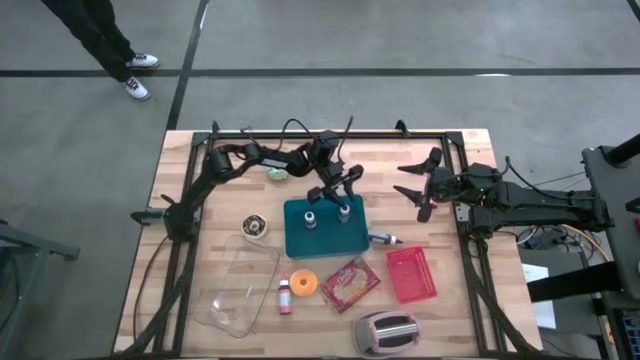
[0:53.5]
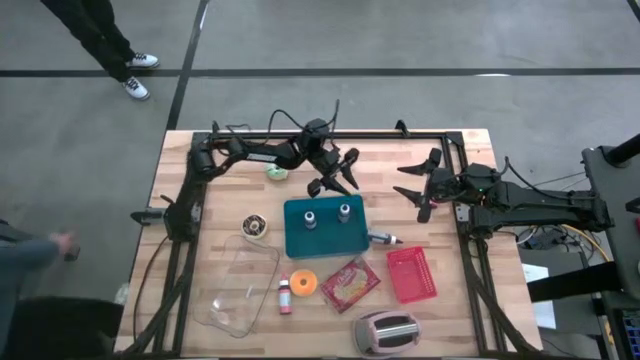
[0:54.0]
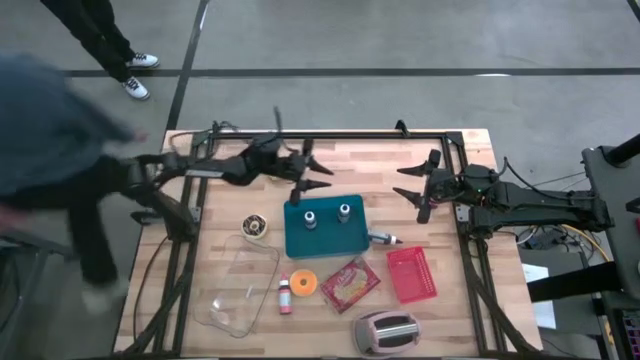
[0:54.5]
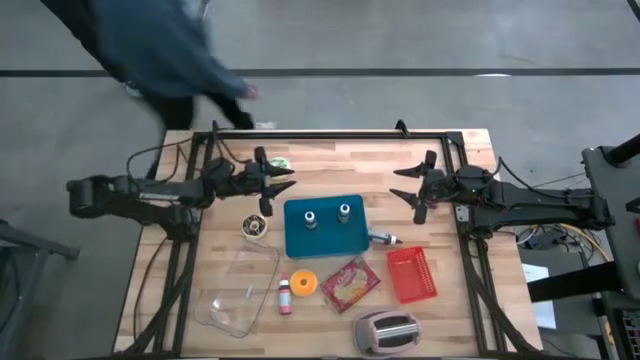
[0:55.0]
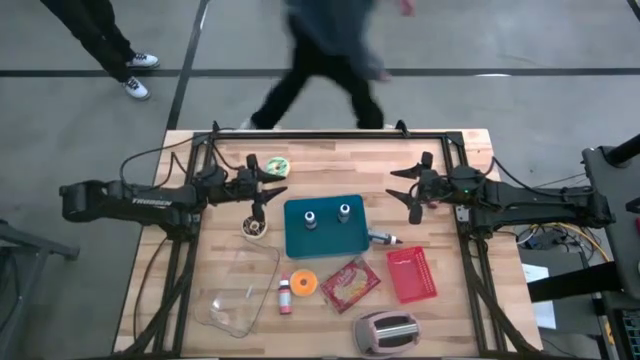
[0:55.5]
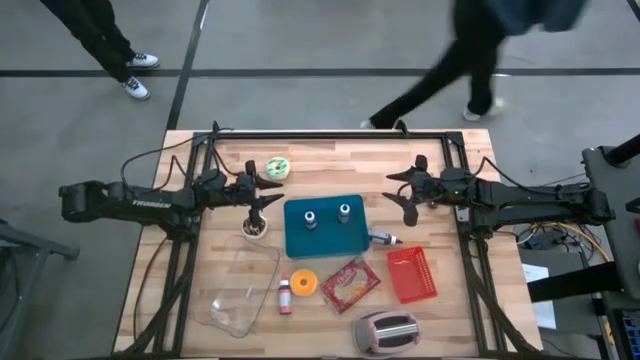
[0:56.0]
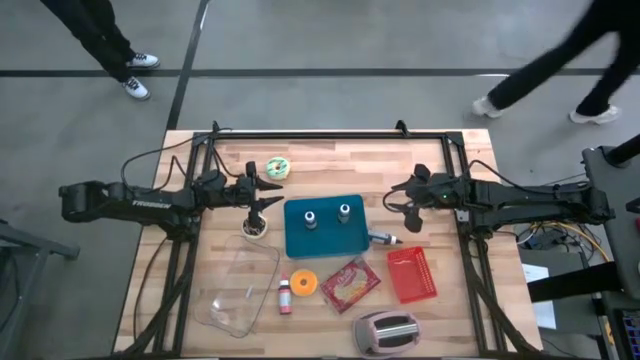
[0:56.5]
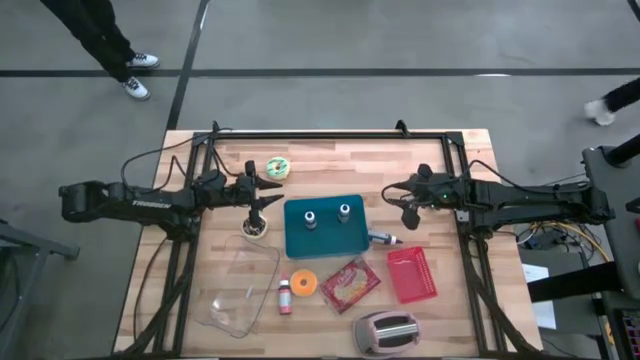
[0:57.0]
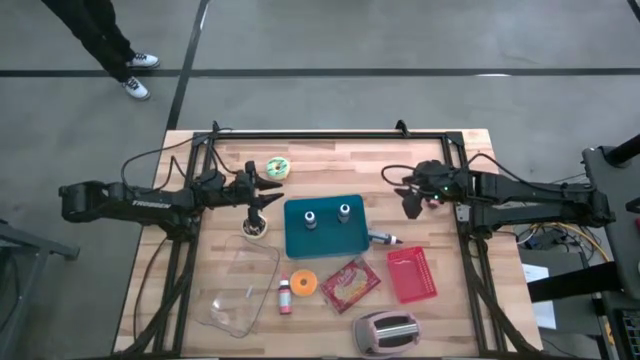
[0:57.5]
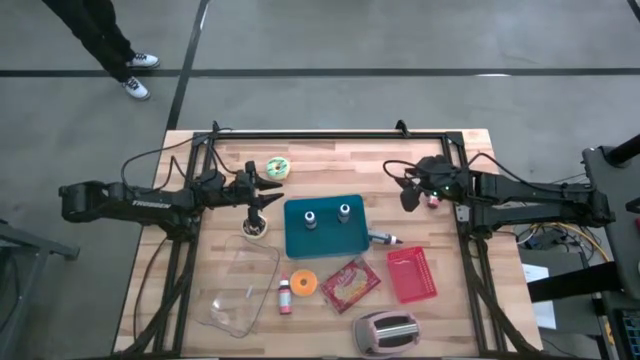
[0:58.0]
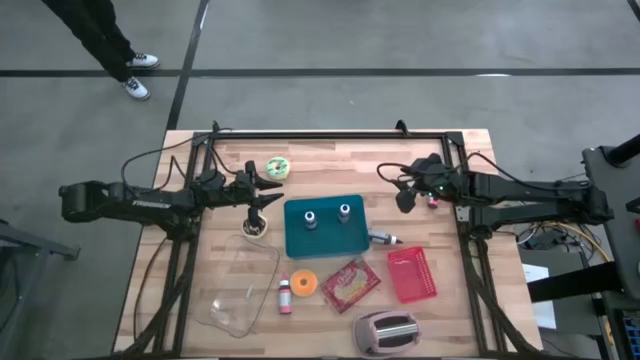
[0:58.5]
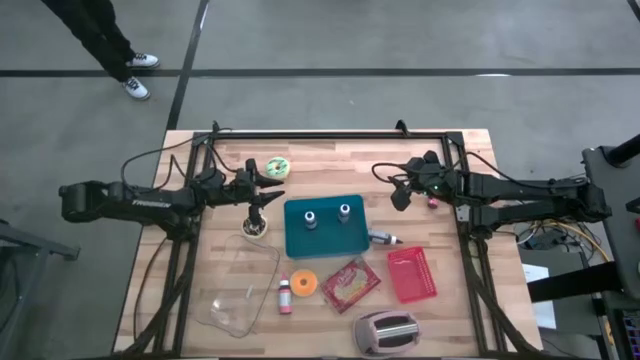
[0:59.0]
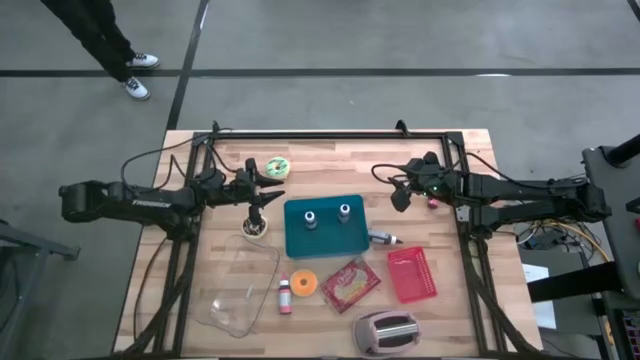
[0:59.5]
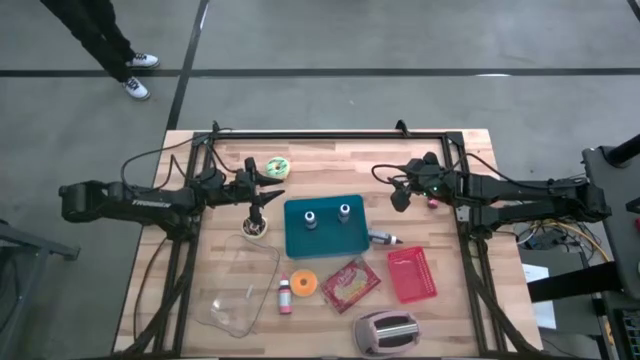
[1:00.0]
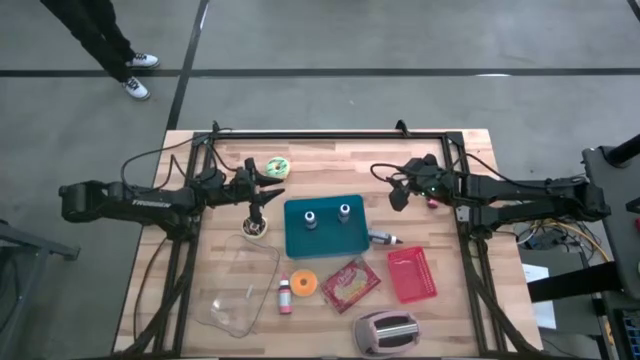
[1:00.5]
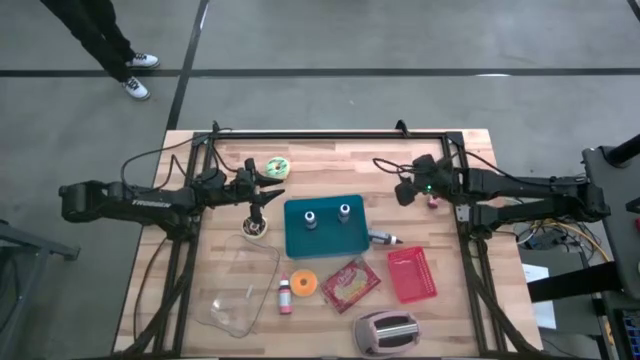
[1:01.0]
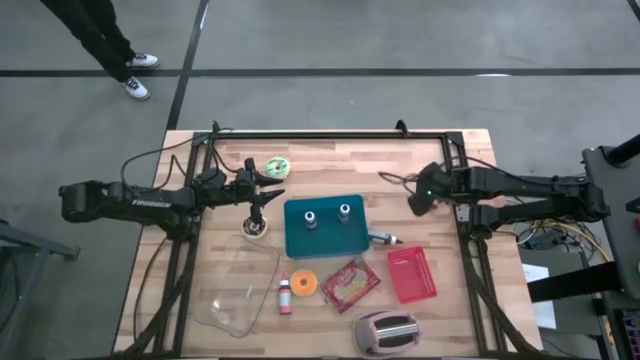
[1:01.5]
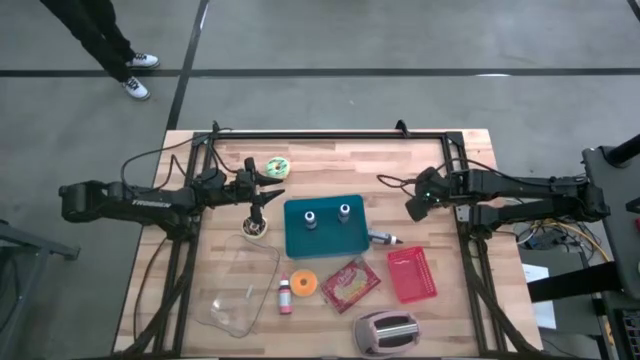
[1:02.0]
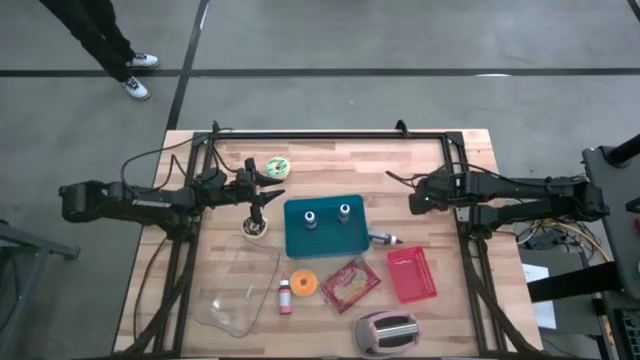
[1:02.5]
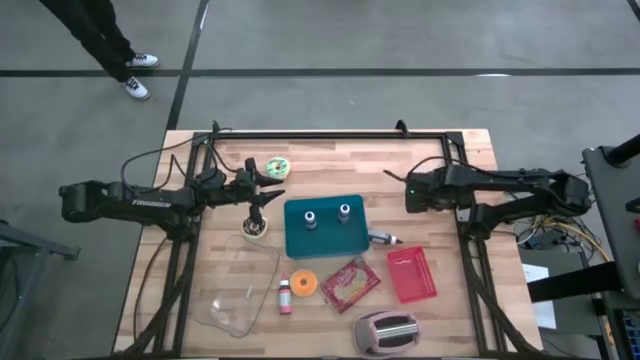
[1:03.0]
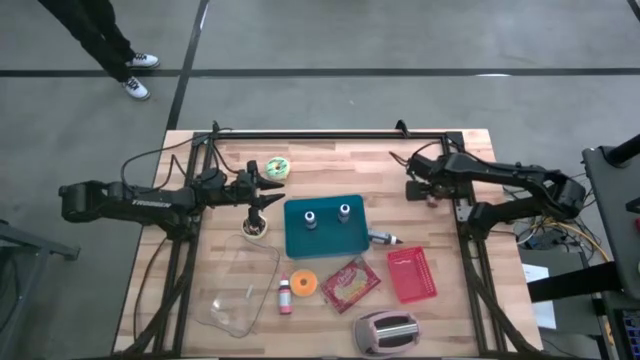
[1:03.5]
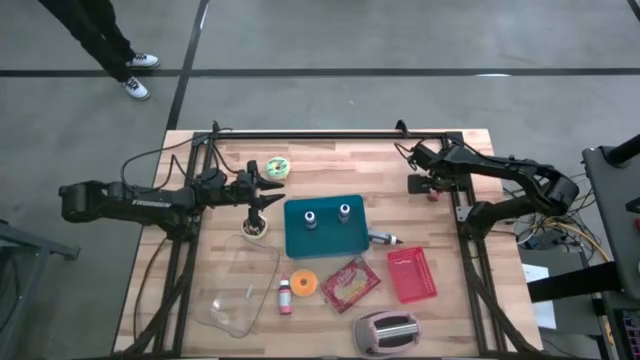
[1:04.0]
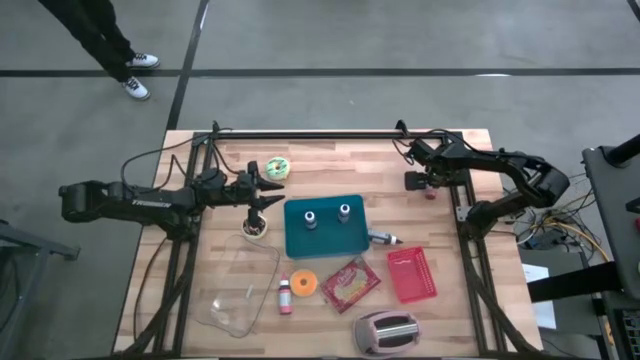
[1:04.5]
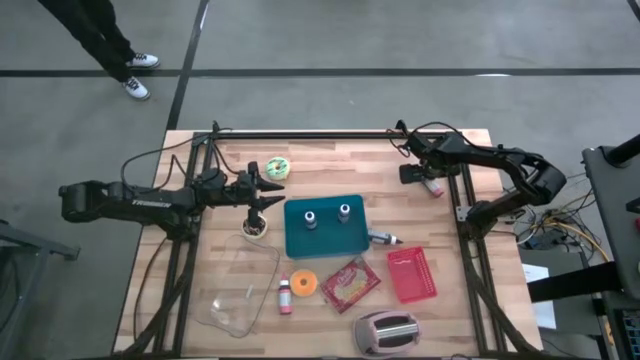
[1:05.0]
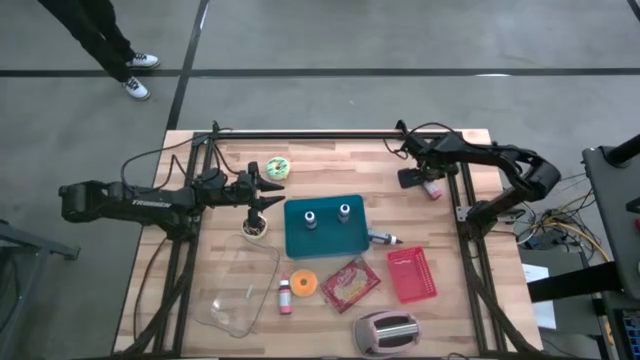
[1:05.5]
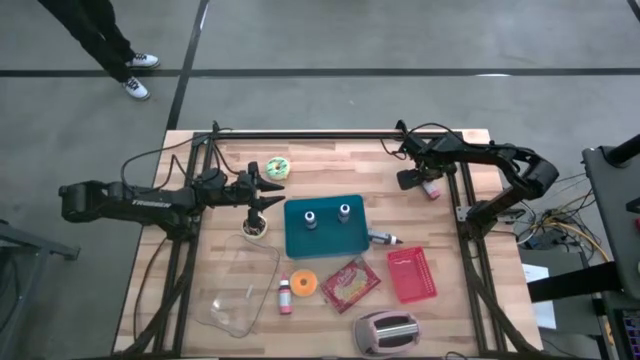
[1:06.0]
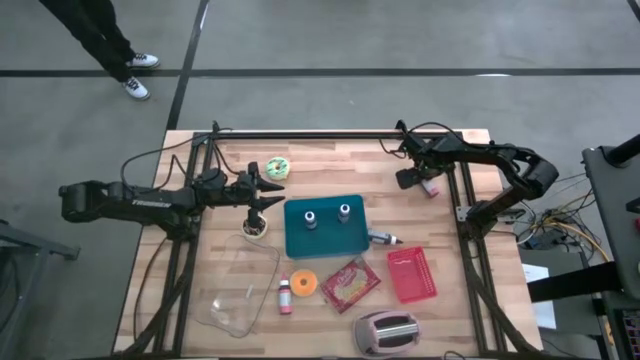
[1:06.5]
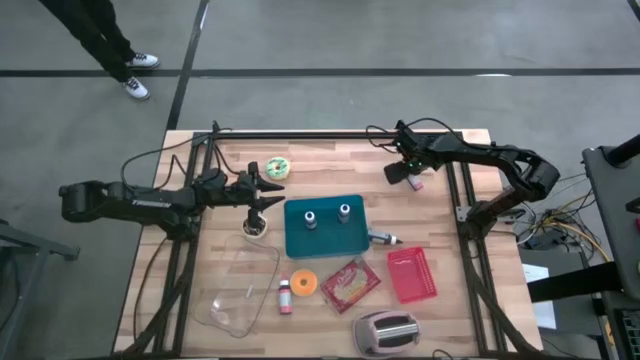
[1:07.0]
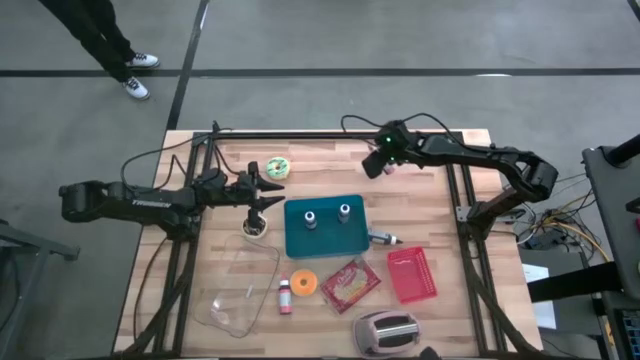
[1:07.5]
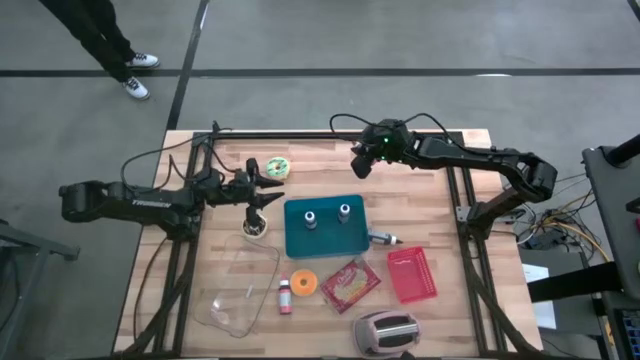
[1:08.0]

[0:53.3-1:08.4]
Task: Pick & Place Food Item
Put the top pink food coloring bottle into the blue bin

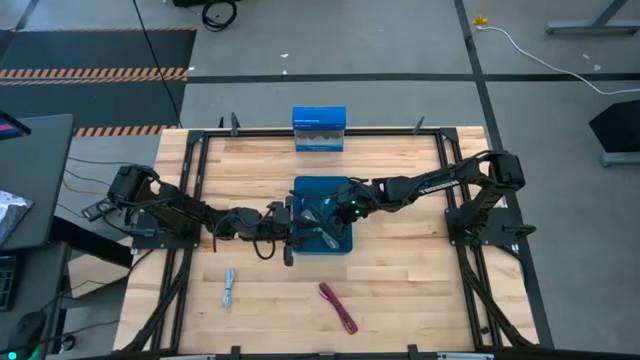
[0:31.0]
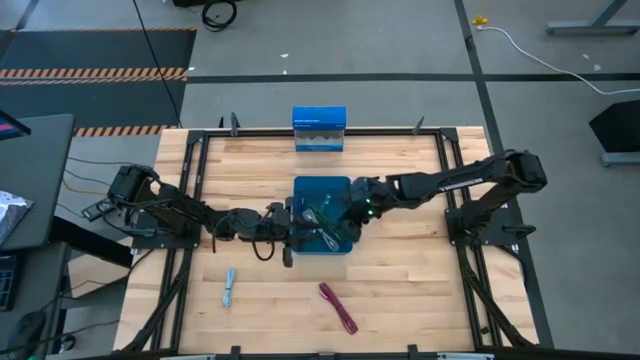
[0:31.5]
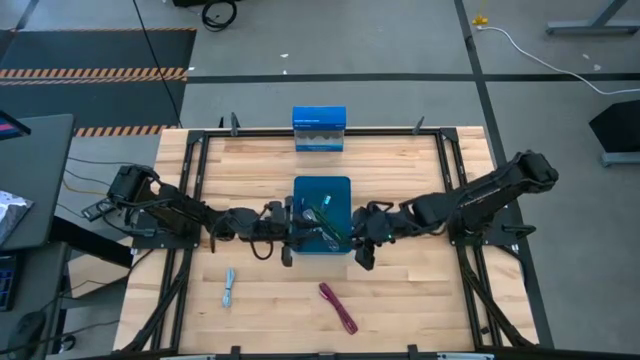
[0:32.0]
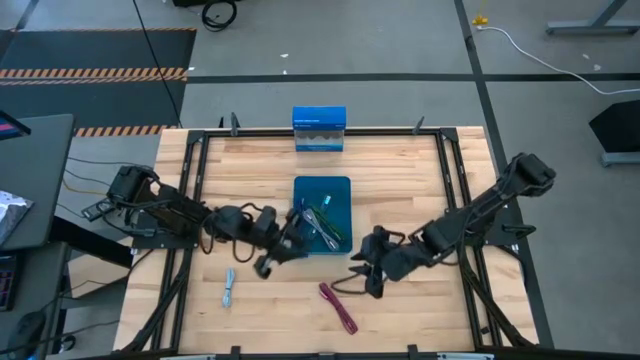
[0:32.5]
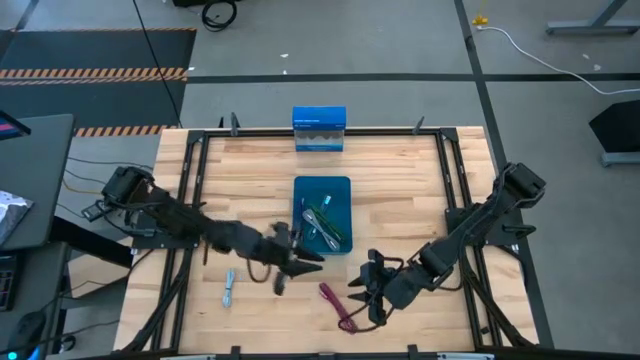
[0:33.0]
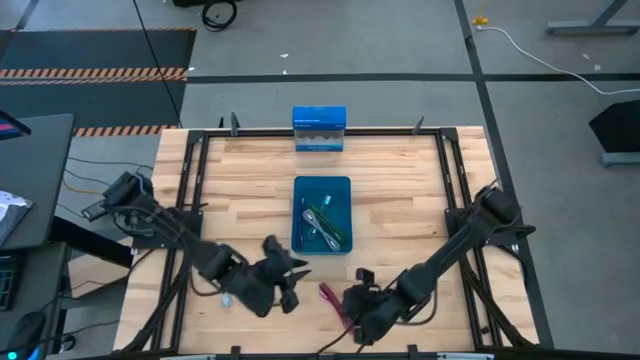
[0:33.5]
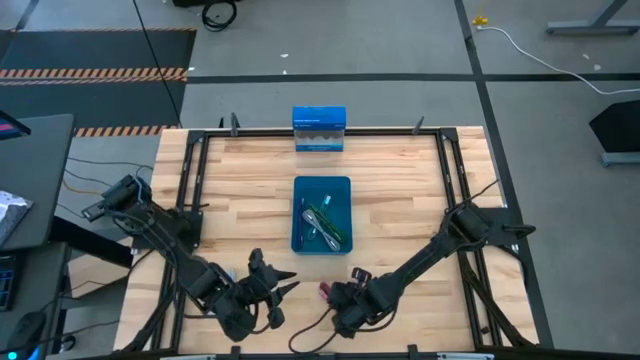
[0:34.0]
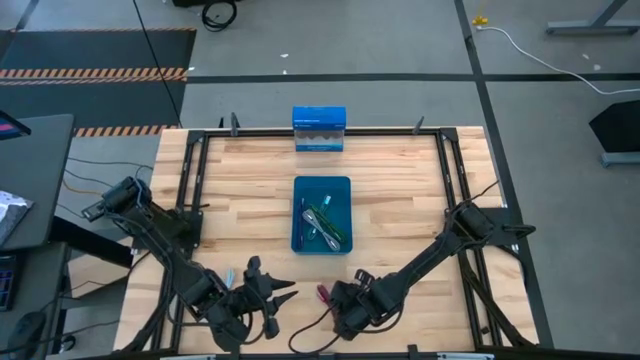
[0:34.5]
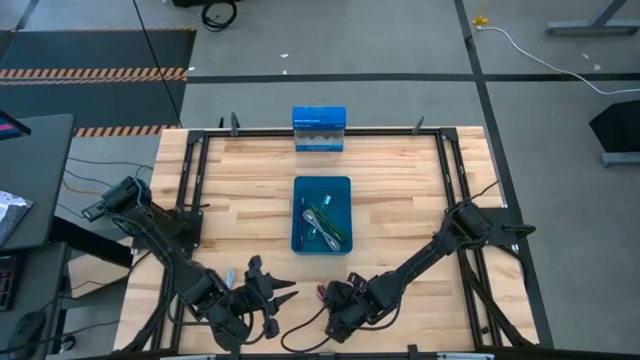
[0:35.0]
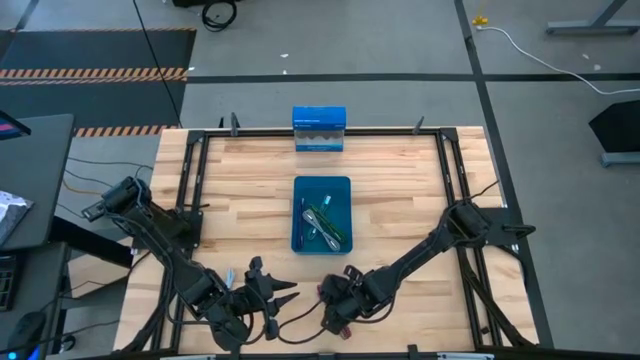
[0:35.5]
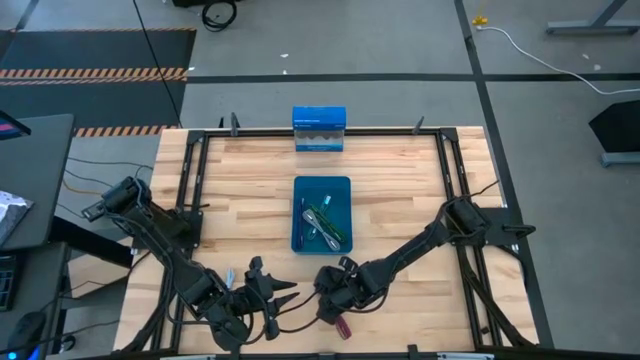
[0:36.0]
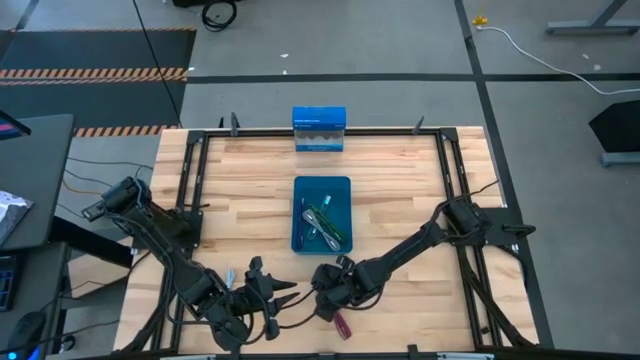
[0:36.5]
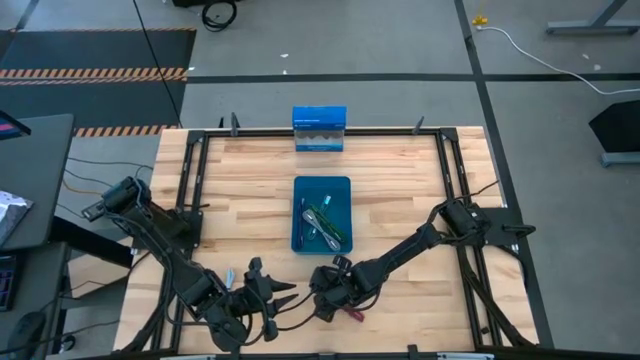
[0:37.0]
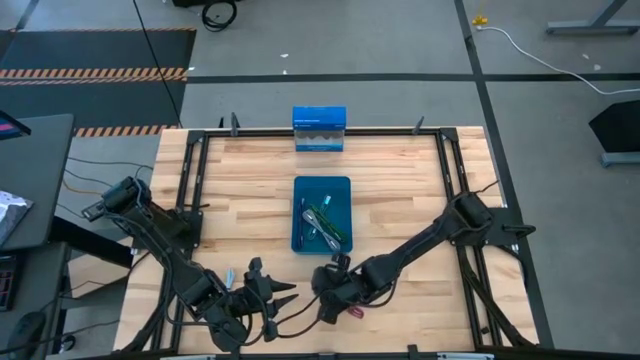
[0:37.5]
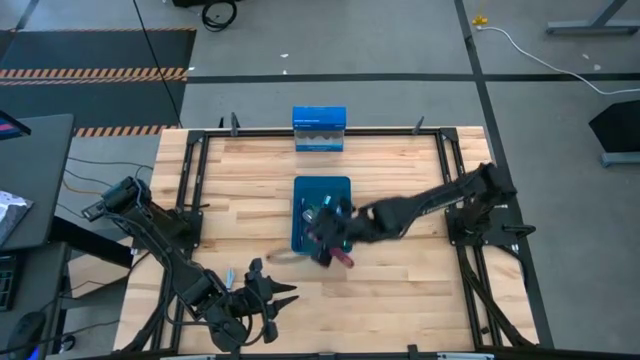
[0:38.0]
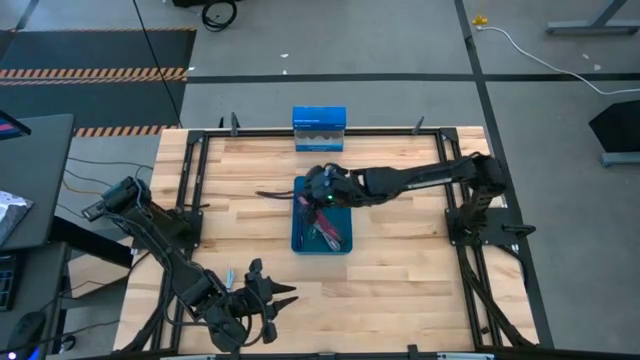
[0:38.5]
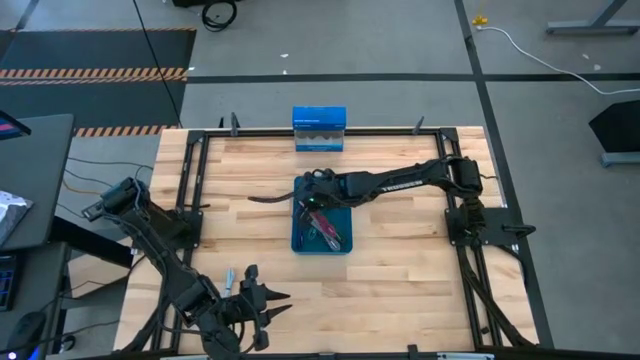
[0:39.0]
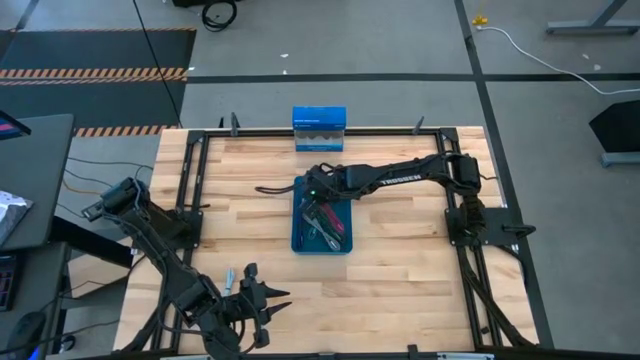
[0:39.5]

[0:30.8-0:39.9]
Task: Pick and place USB-C Cables
Put the pink charger cable into the blue bin
